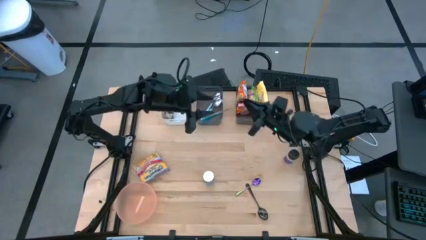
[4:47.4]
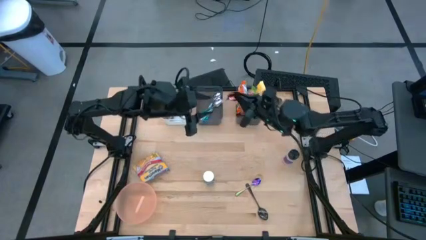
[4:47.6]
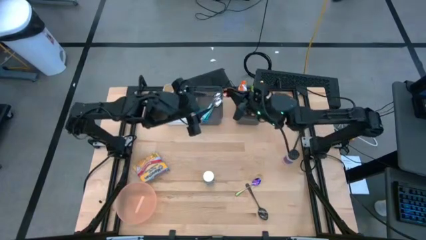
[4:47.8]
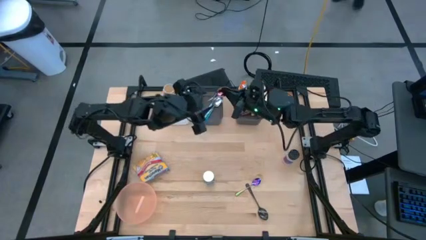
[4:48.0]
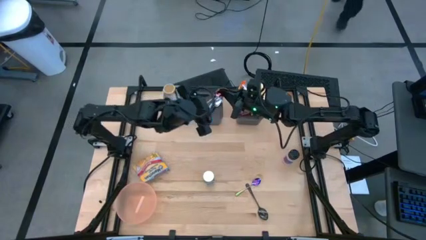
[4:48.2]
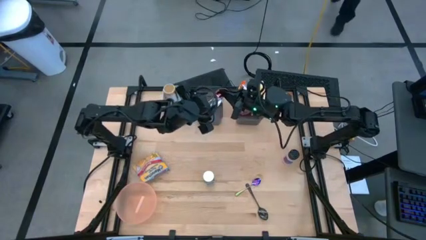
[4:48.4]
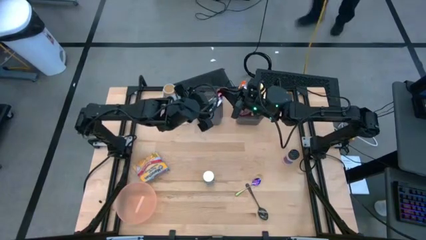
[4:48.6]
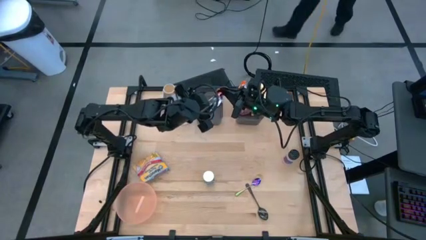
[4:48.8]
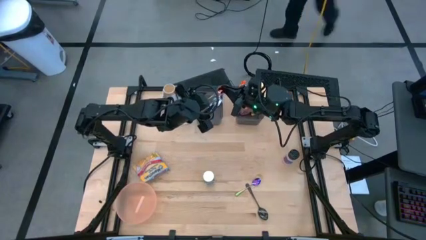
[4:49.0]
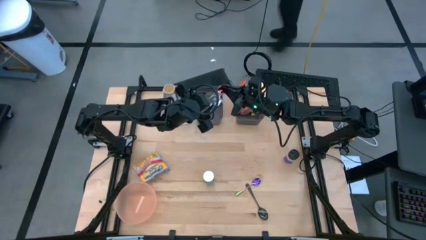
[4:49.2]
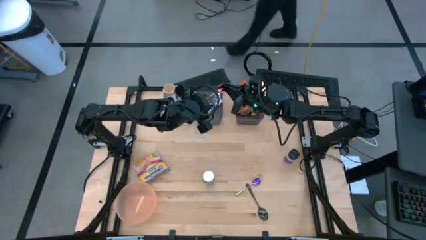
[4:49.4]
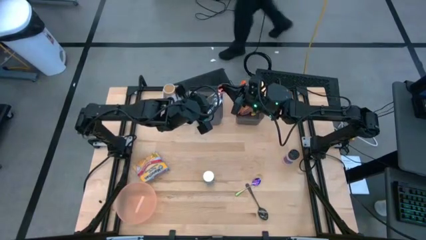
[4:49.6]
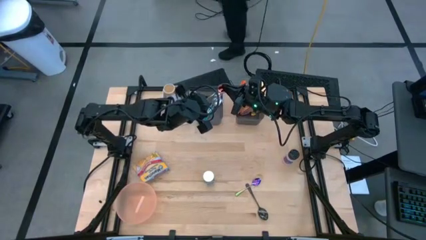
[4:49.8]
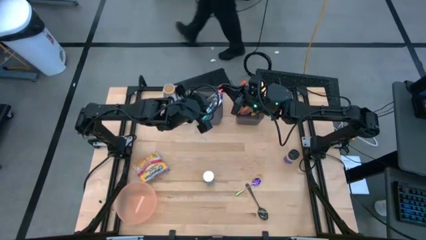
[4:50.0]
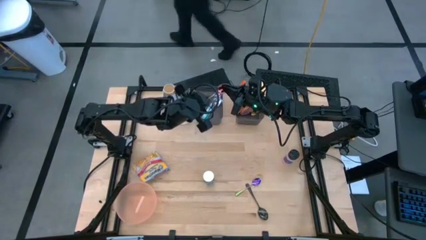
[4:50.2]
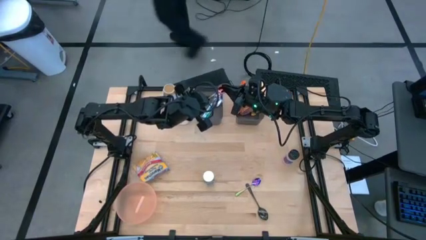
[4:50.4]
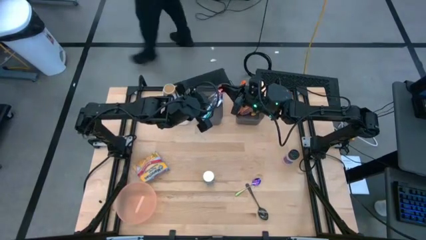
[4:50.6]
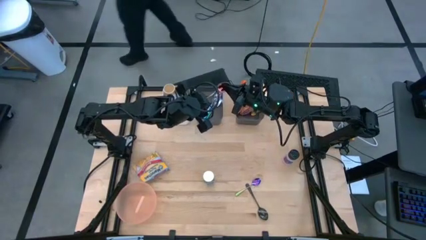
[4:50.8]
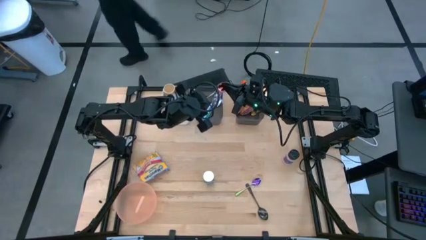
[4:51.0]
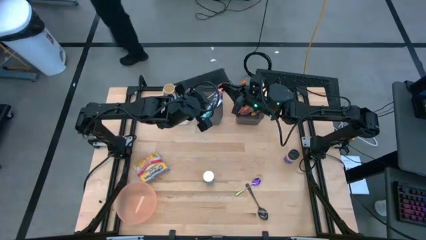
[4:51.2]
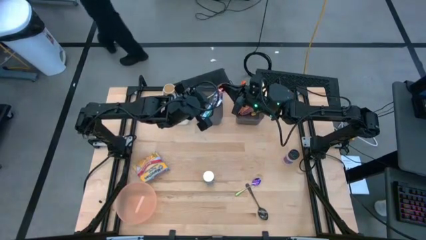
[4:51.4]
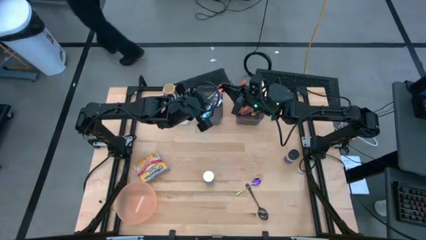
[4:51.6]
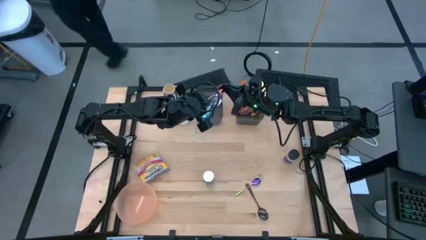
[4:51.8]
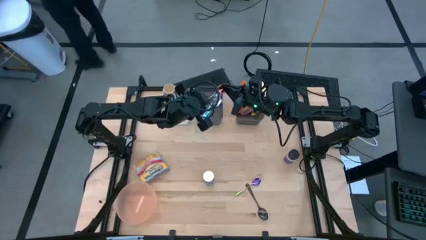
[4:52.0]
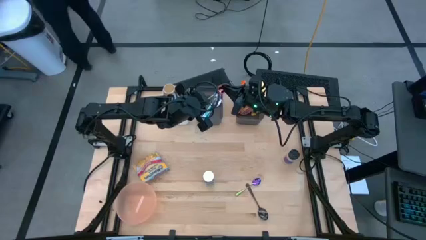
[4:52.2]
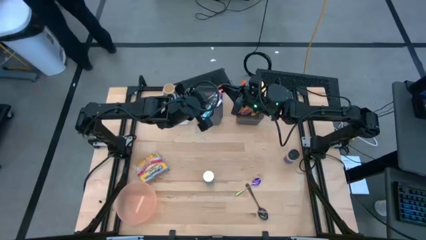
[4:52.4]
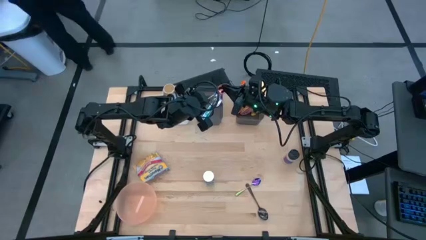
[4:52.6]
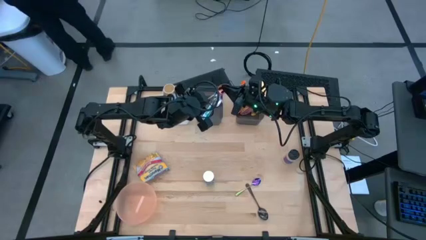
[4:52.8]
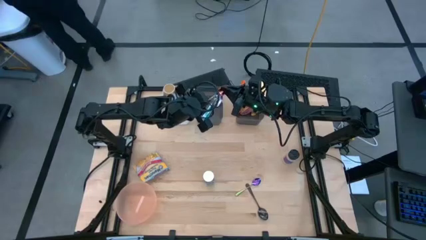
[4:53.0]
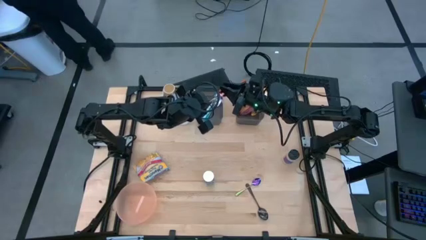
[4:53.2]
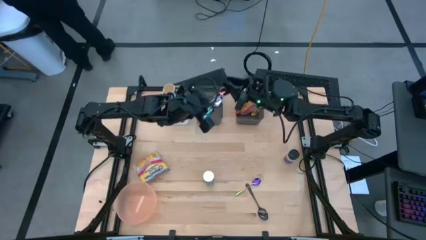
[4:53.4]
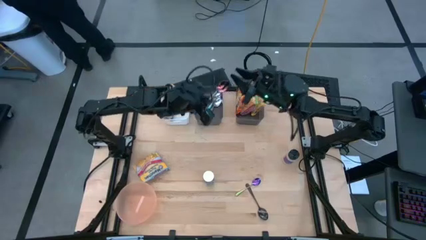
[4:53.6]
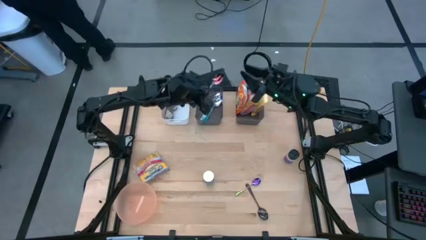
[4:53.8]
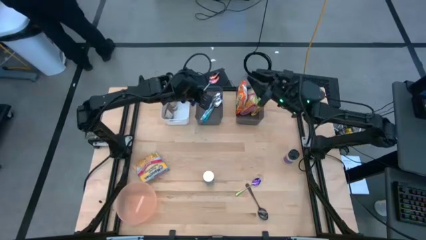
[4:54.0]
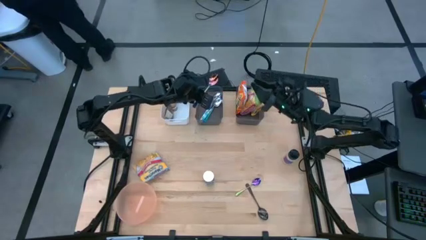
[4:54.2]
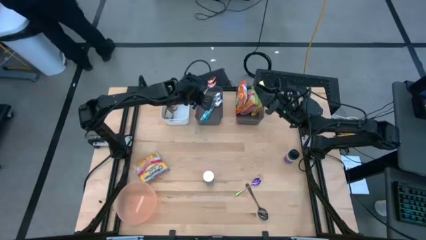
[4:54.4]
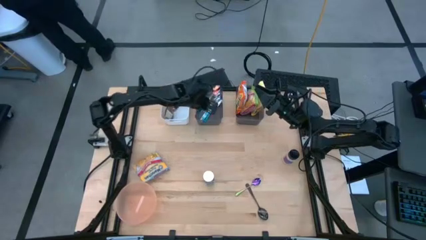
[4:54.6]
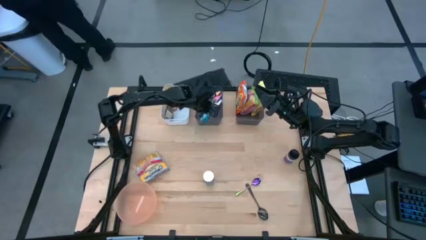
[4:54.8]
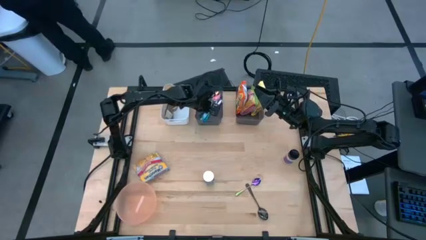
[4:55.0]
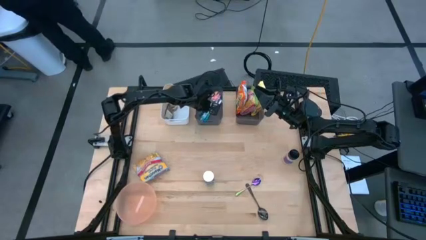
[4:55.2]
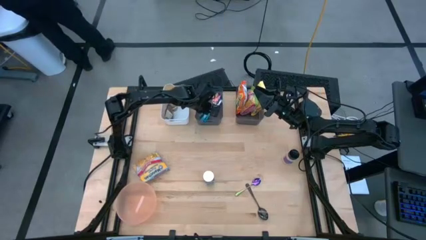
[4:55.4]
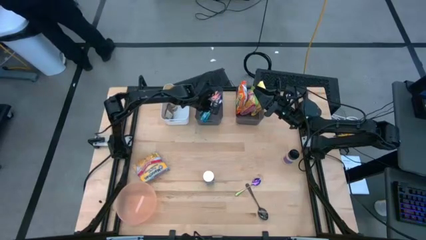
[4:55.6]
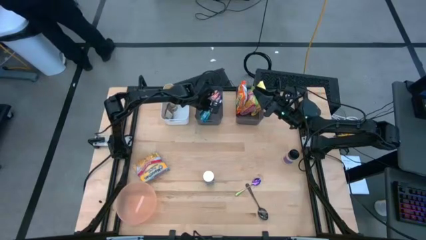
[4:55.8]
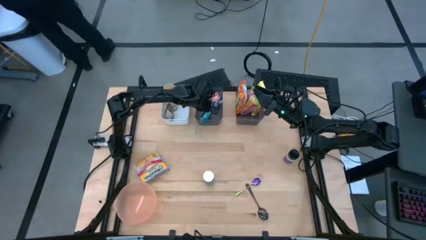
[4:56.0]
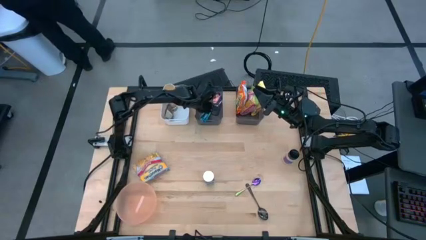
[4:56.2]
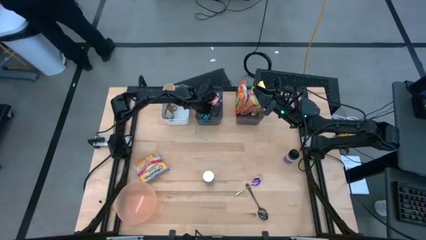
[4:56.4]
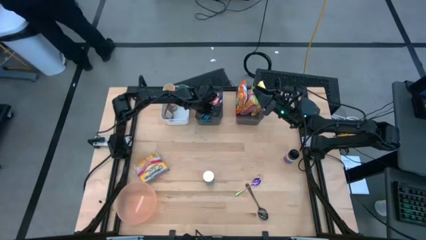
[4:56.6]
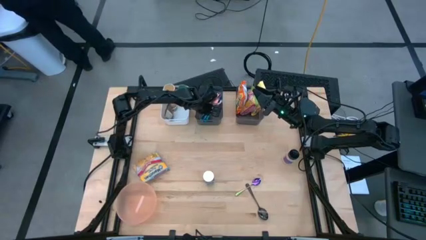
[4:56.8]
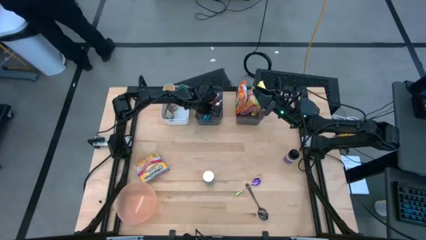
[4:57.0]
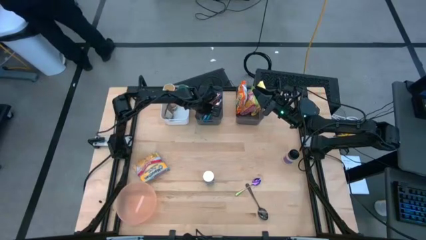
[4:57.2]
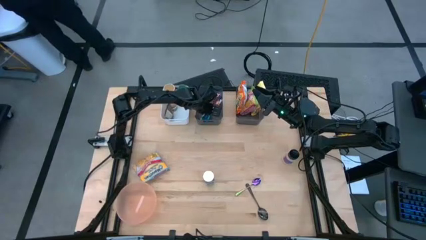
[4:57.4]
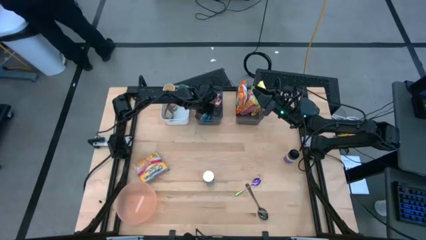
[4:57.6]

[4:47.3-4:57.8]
Task: Pick & Place Food Item
Put the left violet spoon into the left black bin

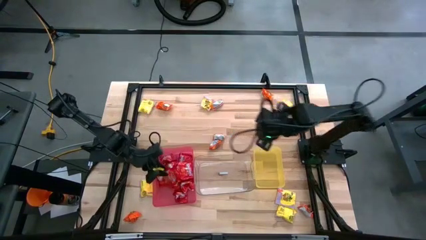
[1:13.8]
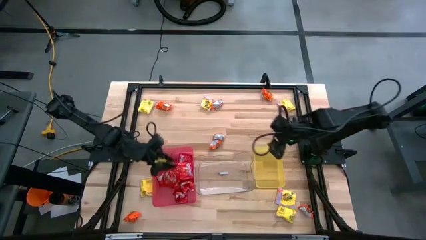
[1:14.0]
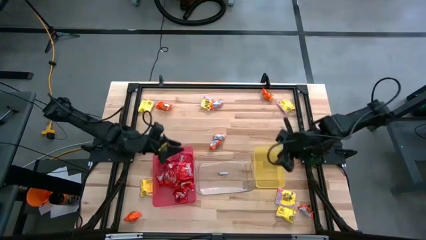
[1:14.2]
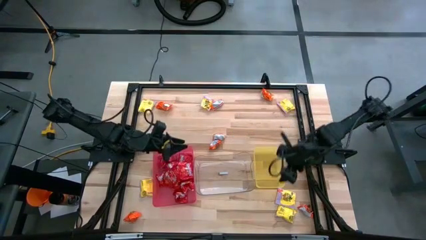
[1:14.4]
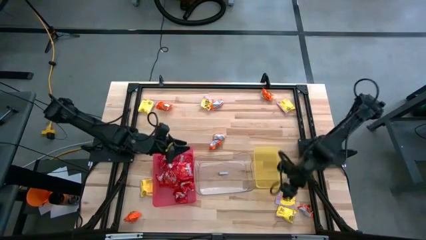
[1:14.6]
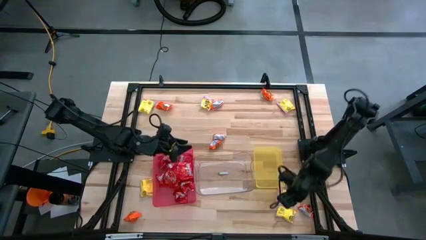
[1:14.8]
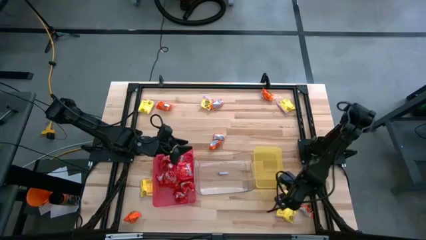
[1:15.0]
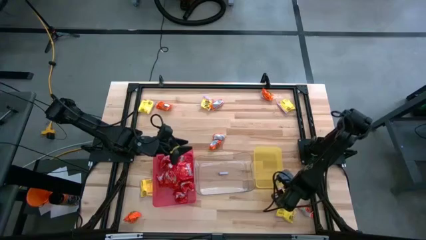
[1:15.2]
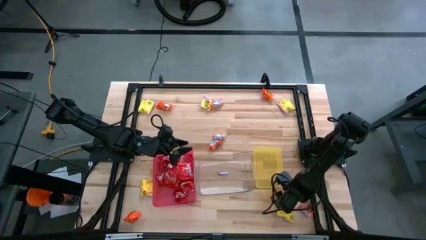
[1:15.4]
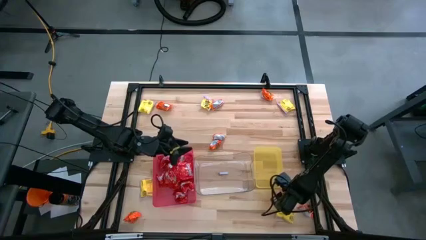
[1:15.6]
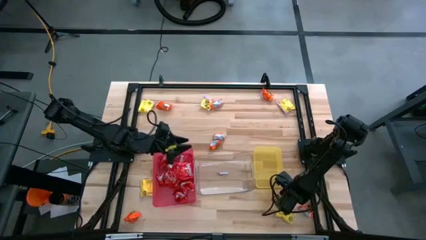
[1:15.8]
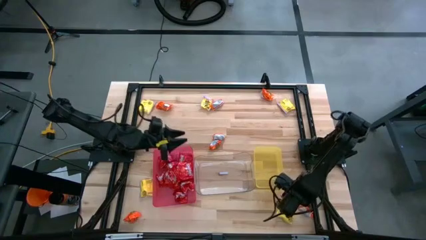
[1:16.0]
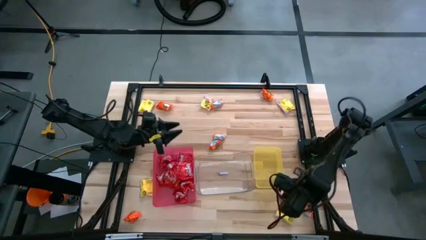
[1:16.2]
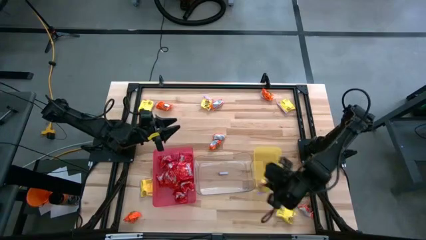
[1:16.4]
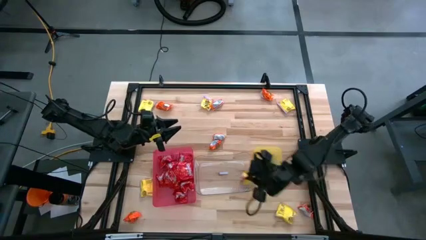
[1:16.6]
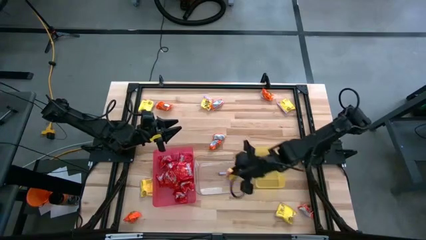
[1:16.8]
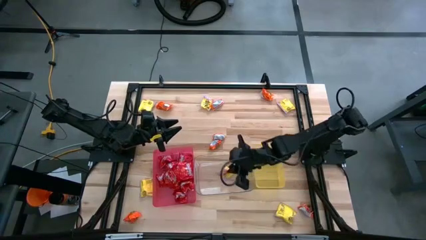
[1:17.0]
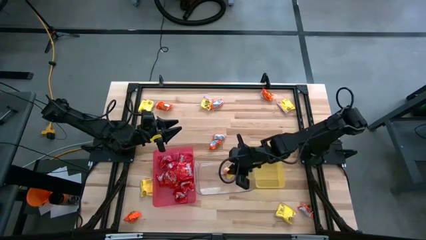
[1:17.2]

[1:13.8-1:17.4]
Task: Sort candy
Put the yellow candy into the transparent bin

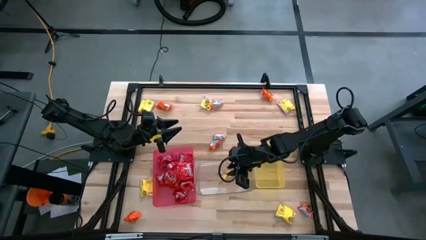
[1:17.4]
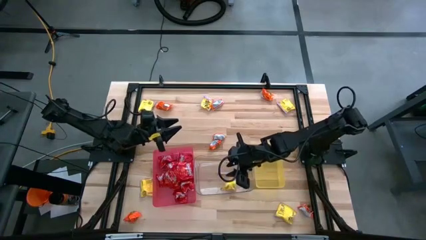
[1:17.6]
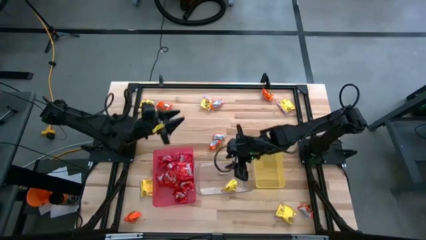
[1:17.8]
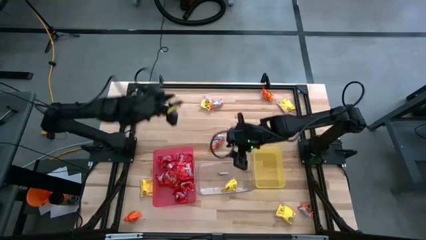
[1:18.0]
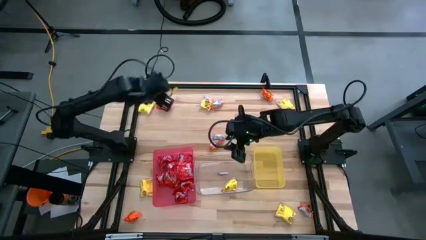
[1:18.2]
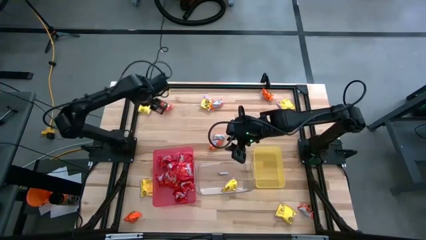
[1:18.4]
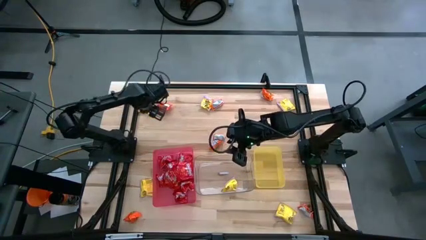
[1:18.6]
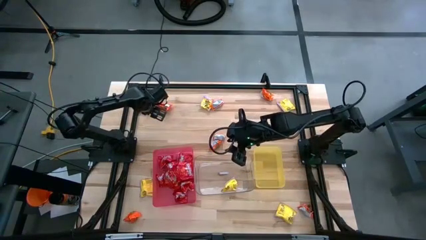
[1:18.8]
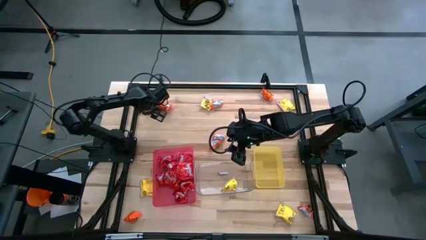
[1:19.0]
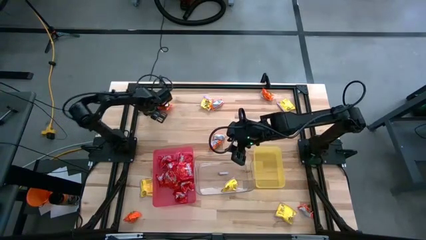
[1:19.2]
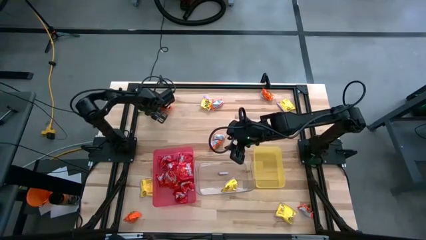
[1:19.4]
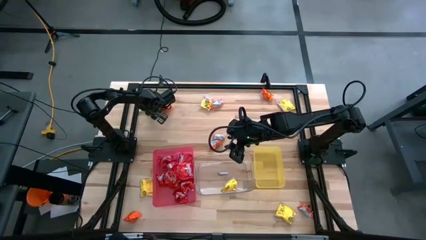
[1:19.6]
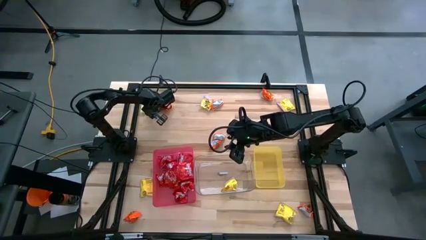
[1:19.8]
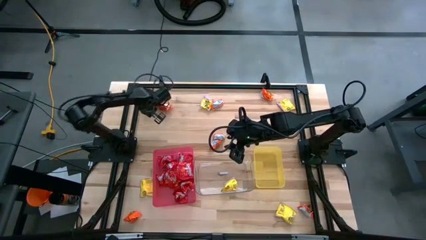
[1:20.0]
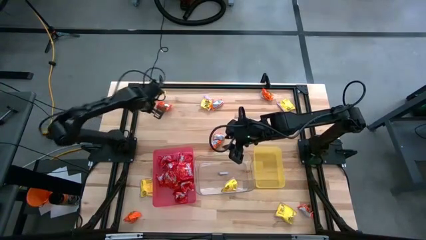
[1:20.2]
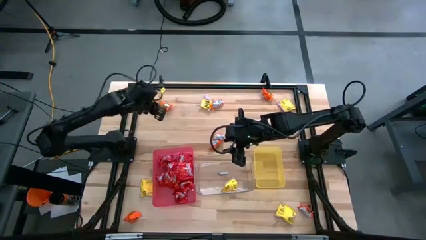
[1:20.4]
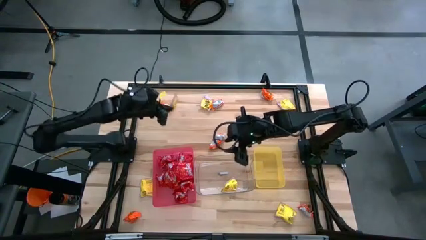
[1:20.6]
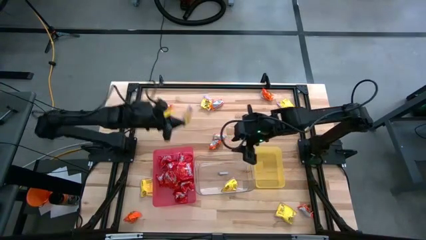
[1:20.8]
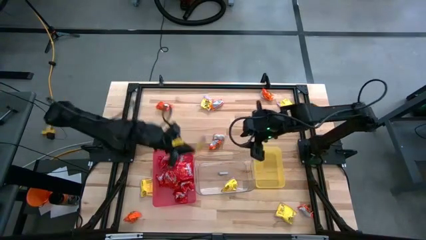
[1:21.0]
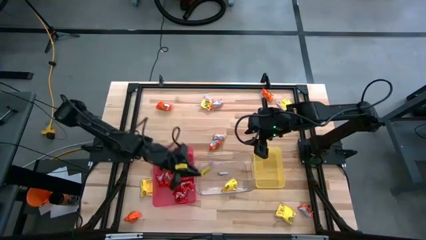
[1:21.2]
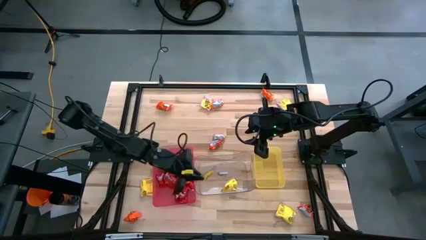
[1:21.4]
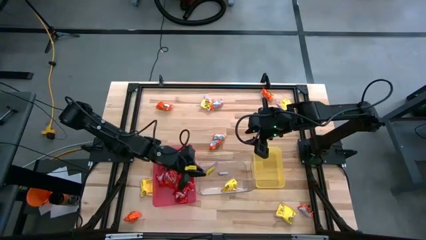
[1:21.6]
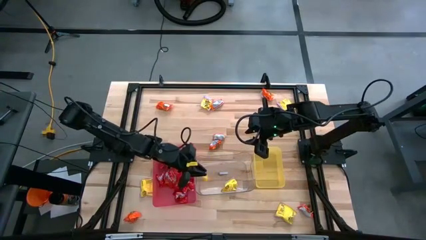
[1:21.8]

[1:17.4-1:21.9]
Put the yellow candy into the transparent bin
